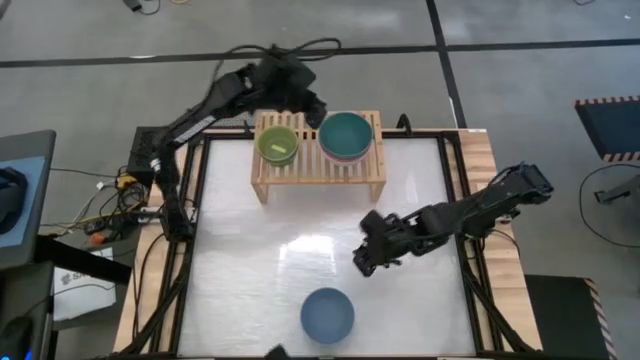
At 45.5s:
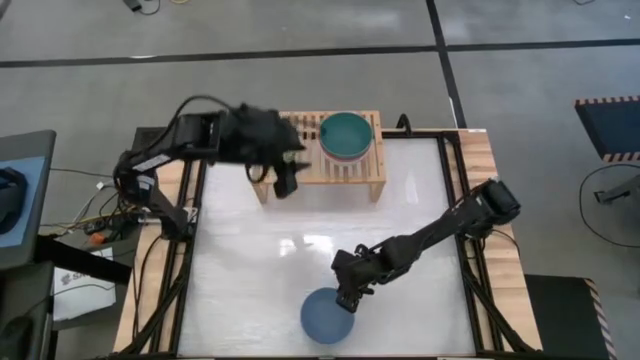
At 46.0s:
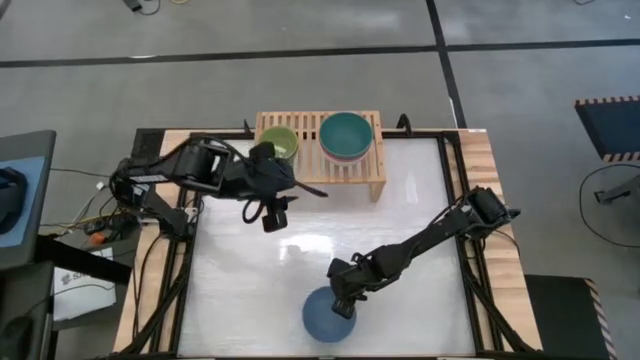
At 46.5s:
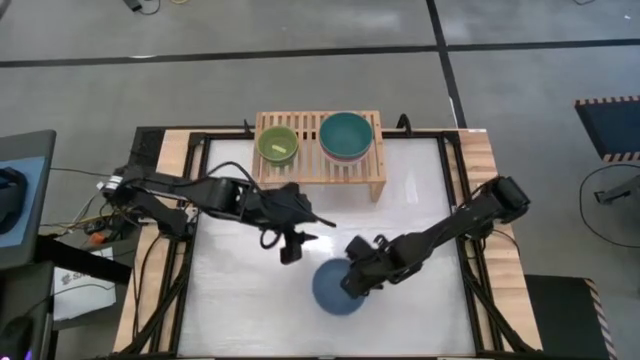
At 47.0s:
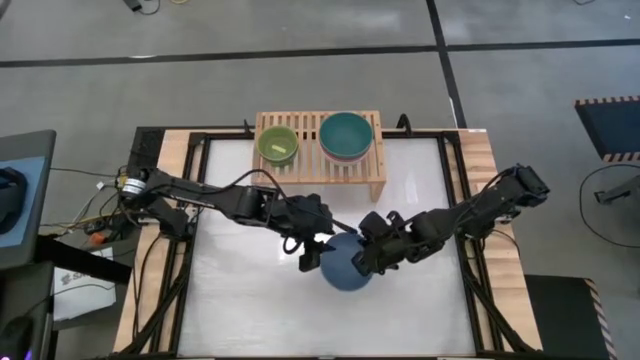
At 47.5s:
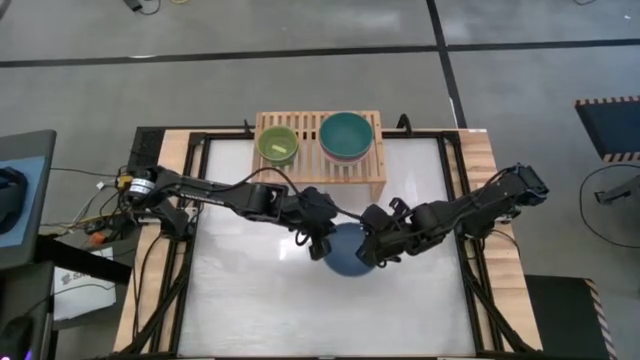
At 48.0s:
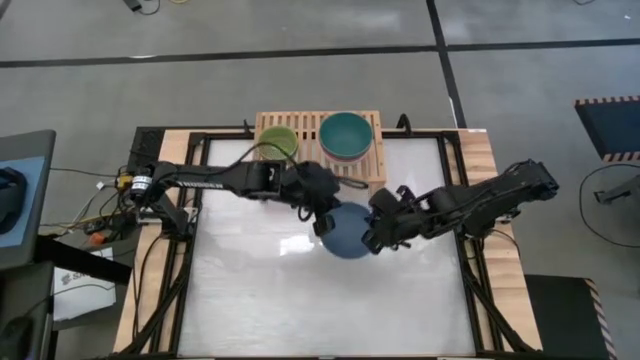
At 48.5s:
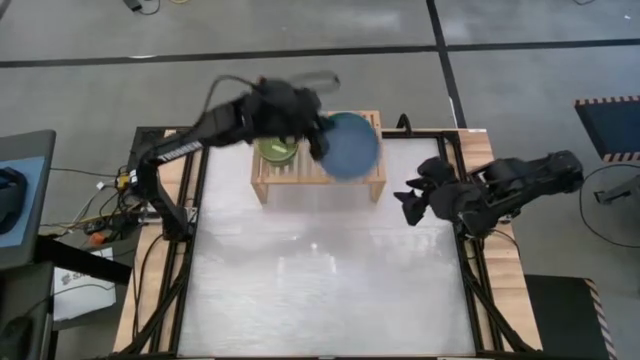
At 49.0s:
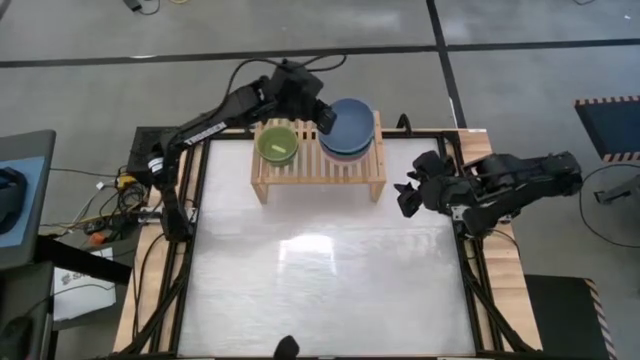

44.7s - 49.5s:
Task: Place and stack bowls onto a shelf
Stack the blue bowl on top of the green bowl

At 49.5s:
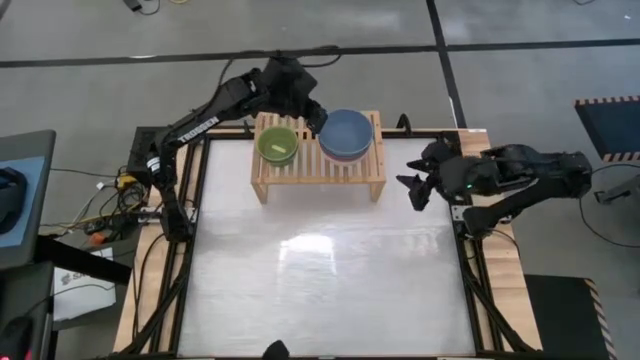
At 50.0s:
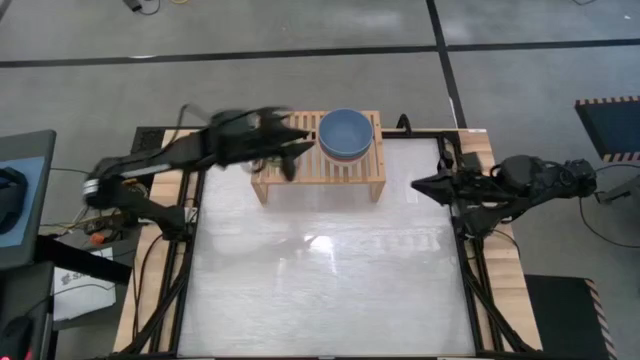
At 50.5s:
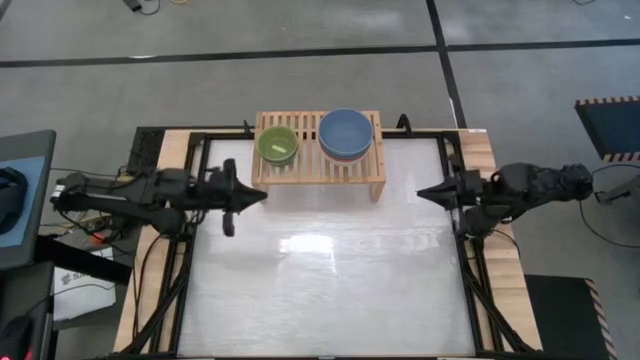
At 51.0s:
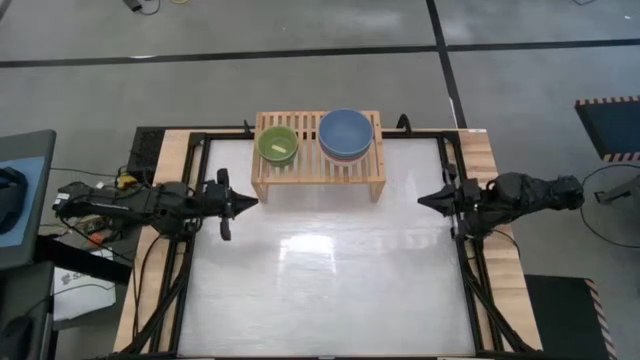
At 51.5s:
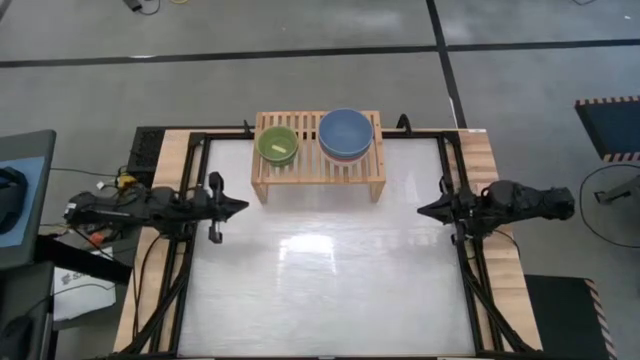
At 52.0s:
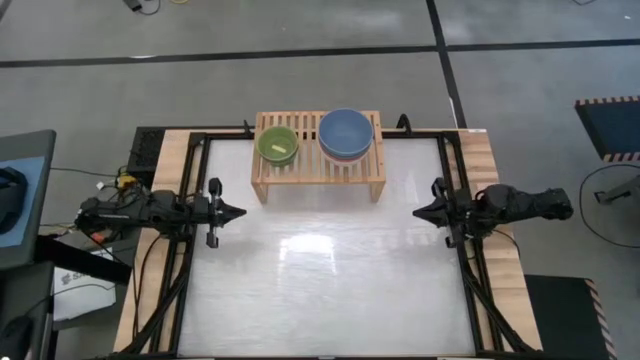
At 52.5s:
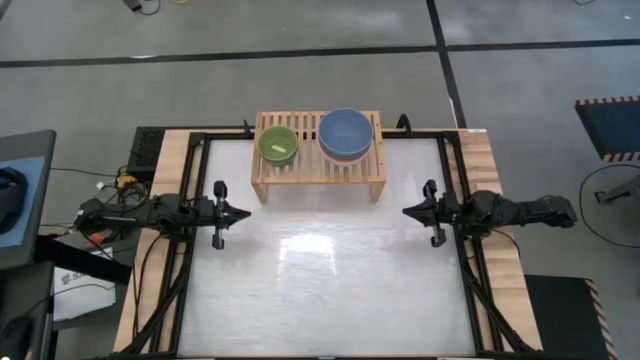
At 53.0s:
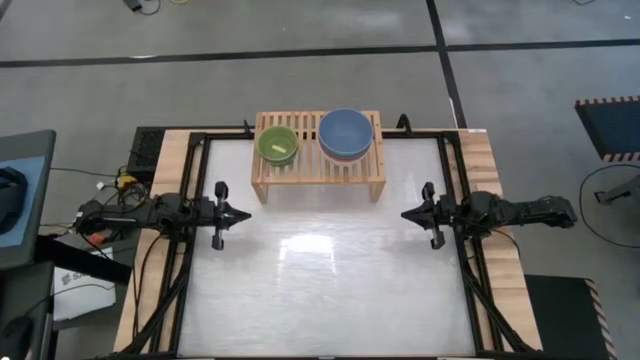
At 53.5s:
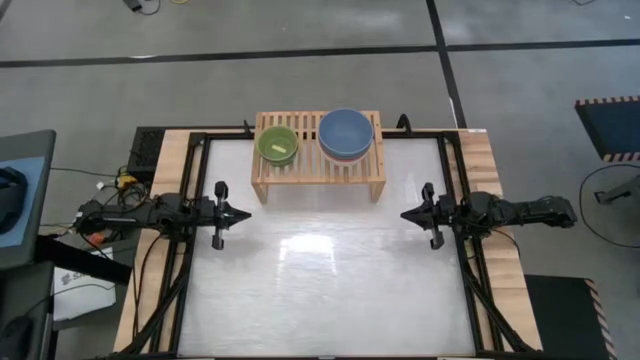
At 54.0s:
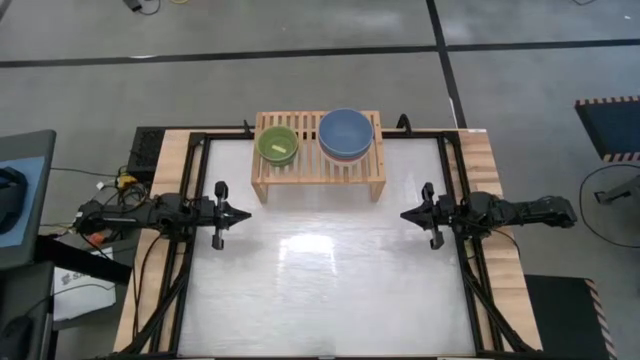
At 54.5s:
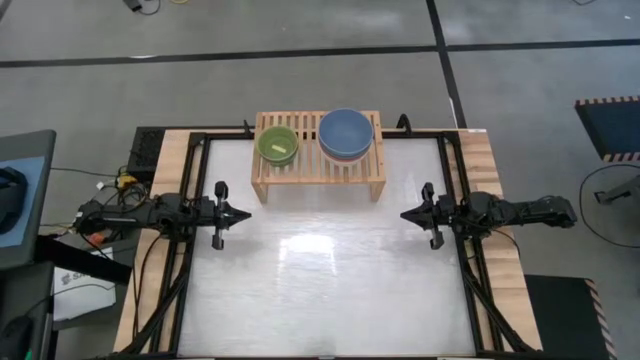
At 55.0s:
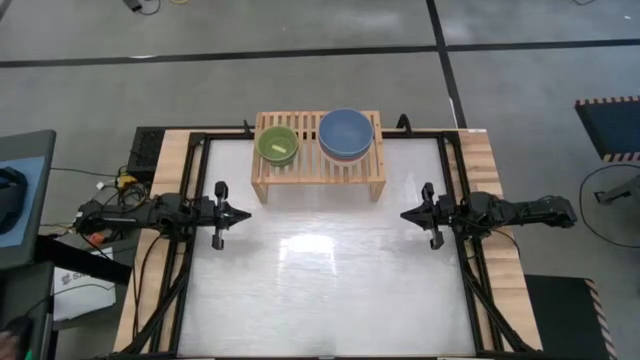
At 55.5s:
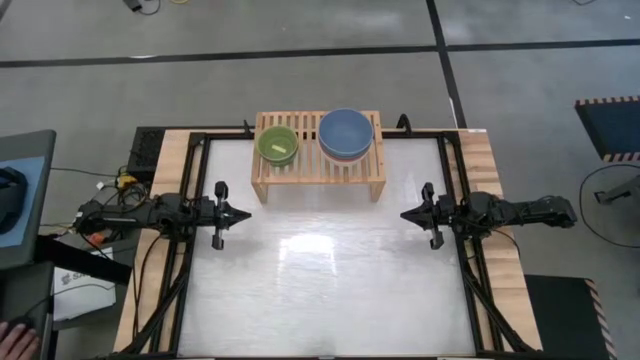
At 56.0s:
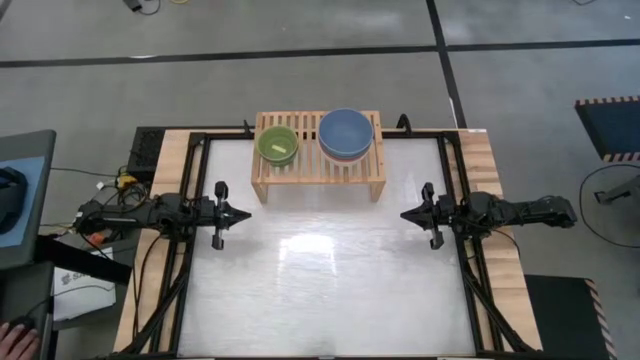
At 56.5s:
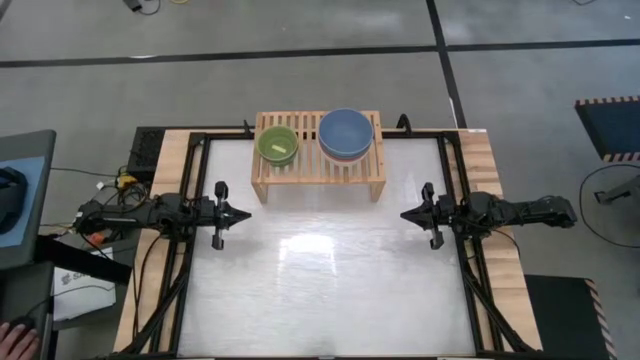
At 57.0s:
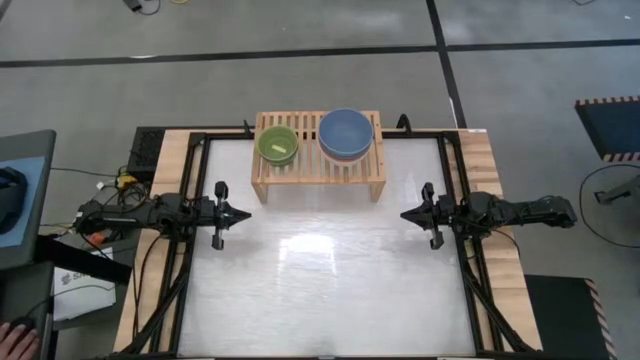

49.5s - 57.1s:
Return to Home Position

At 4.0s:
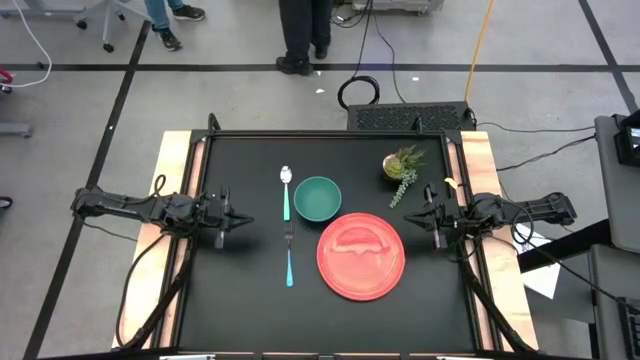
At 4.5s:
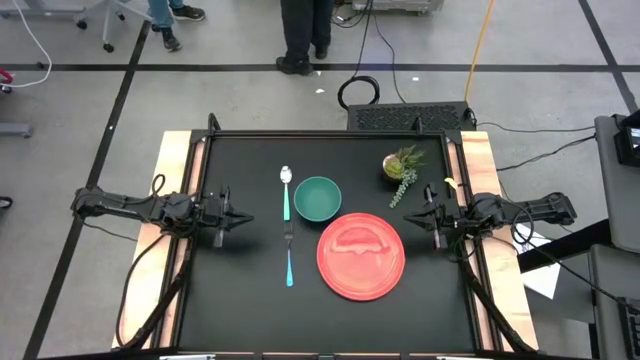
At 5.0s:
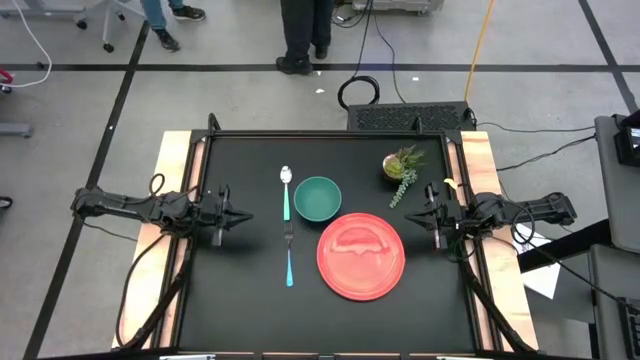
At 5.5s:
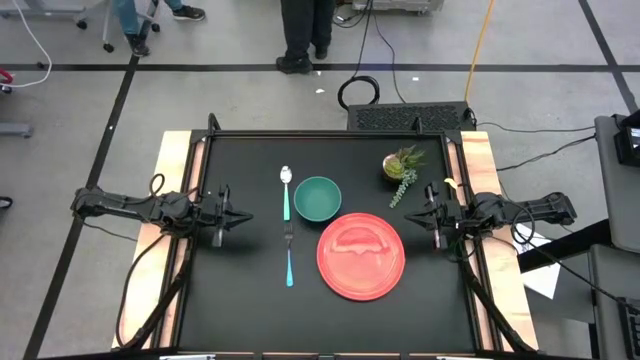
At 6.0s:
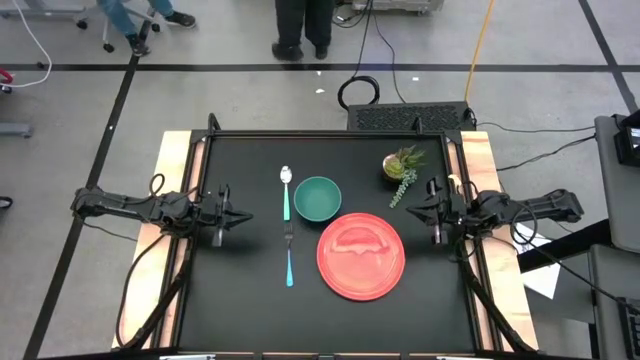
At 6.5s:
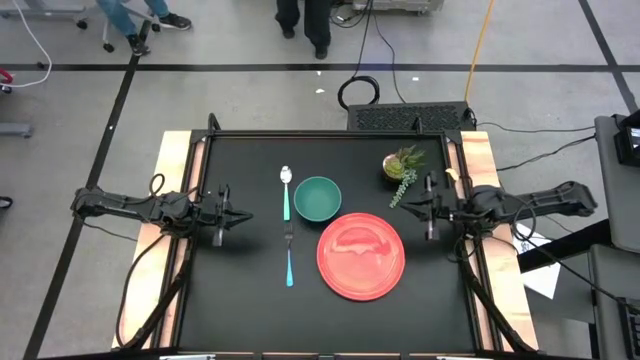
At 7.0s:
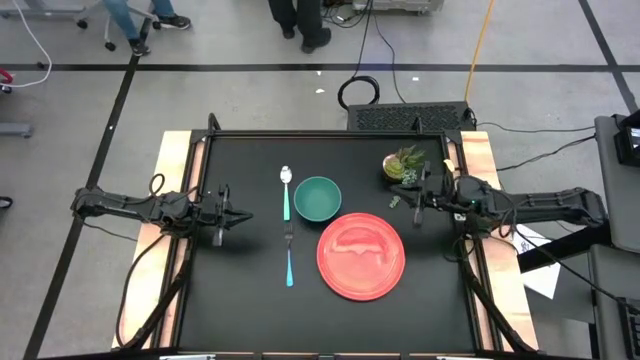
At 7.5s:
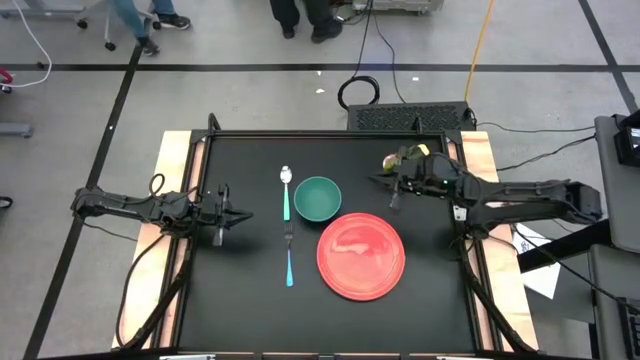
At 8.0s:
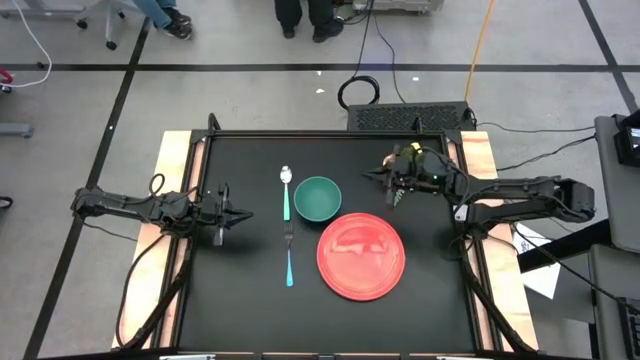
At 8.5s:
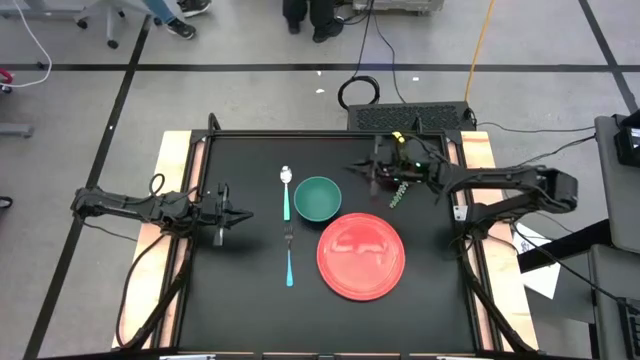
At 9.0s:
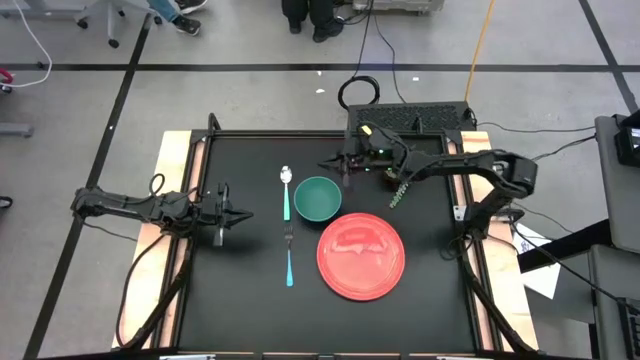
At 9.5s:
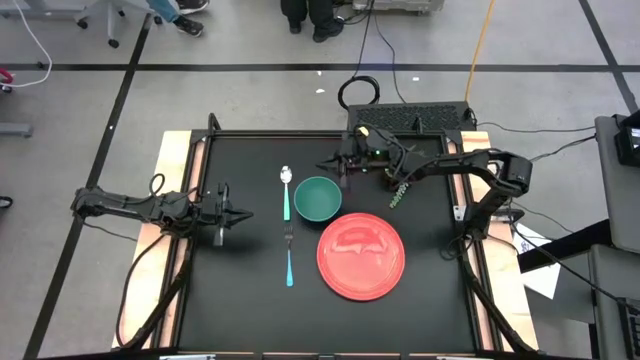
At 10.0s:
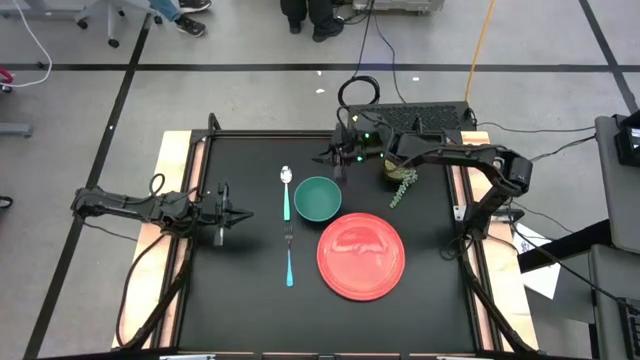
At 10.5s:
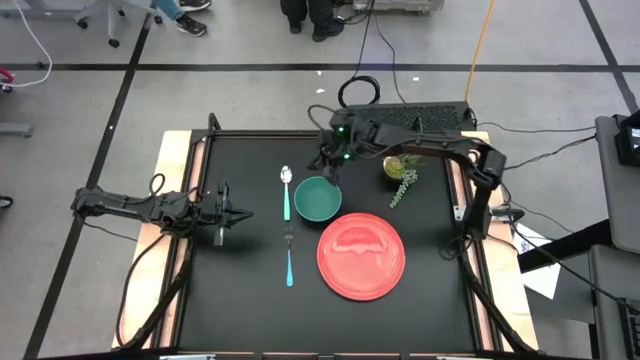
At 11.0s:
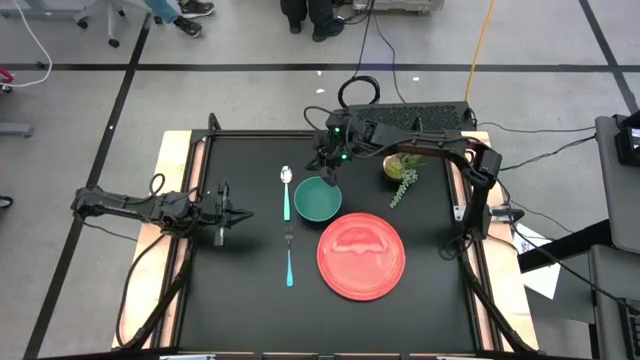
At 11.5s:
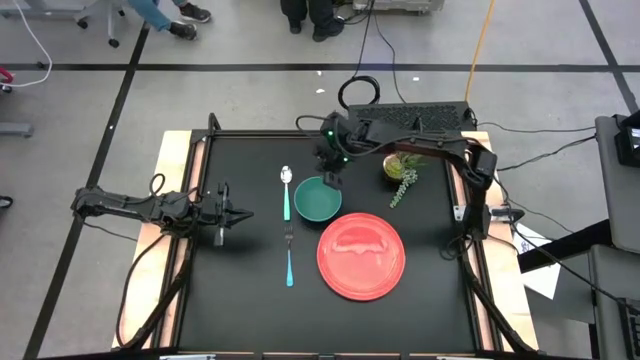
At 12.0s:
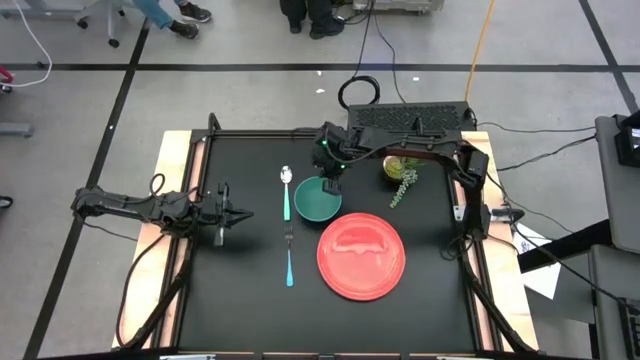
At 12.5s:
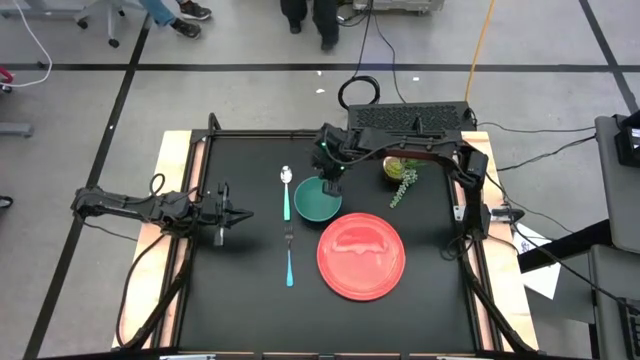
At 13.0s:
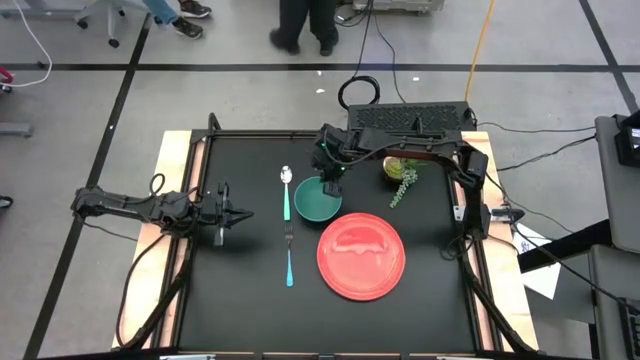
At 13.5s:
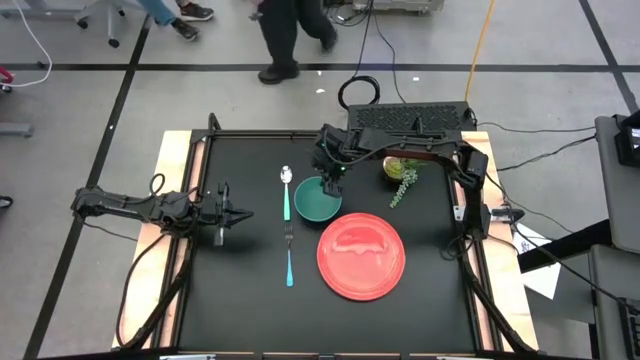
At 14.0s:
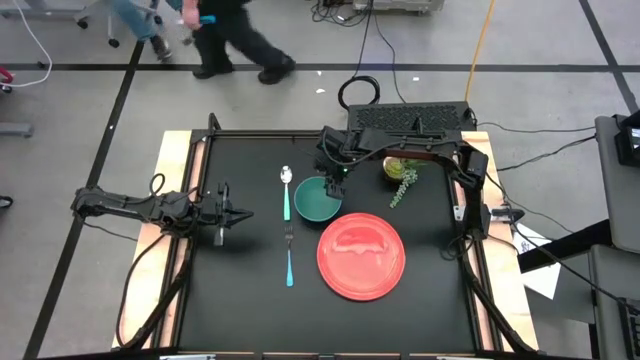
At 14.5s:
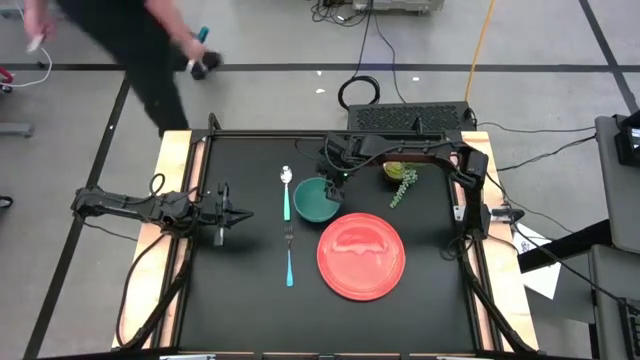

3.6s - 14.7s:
Task: Set table place
Put the green bowl on the orange plate
